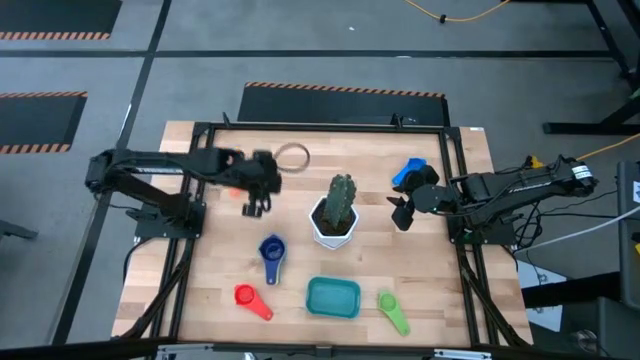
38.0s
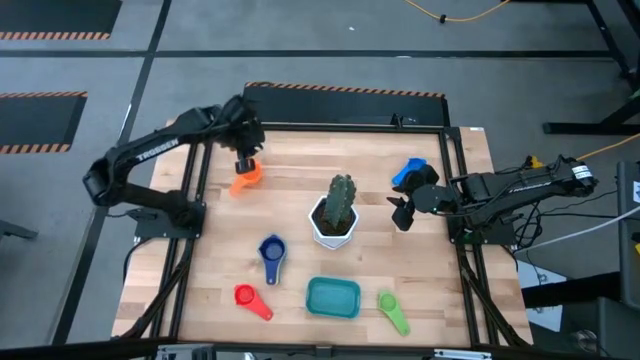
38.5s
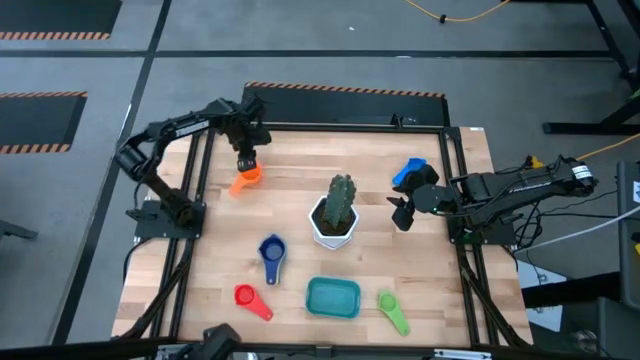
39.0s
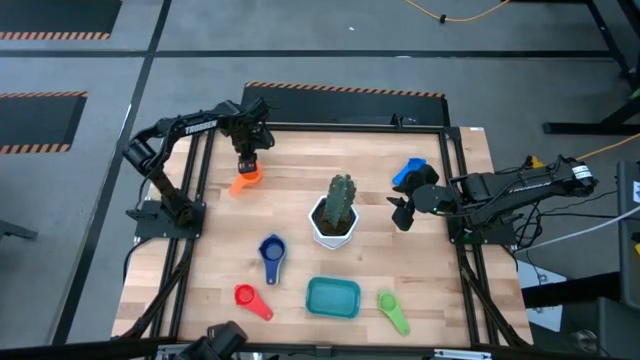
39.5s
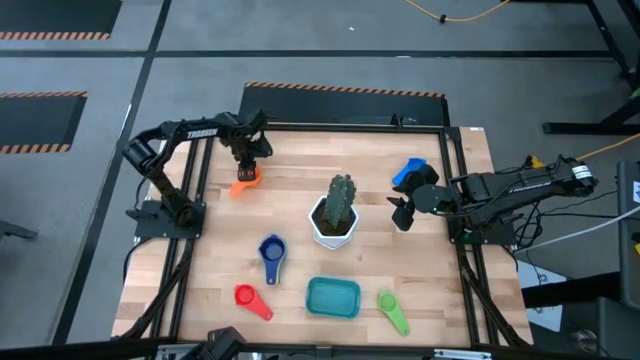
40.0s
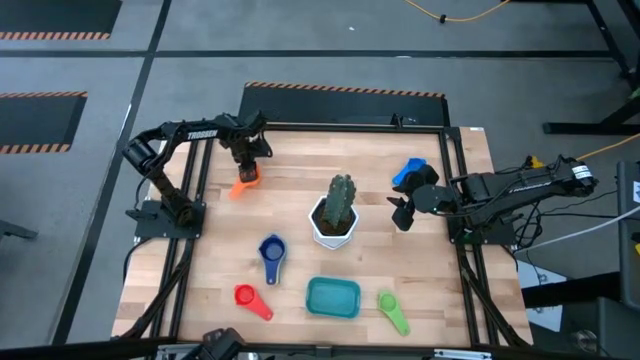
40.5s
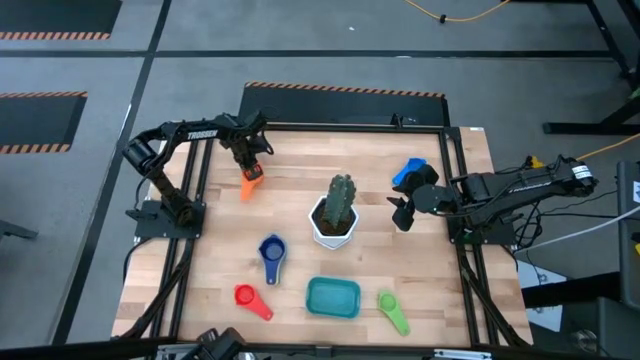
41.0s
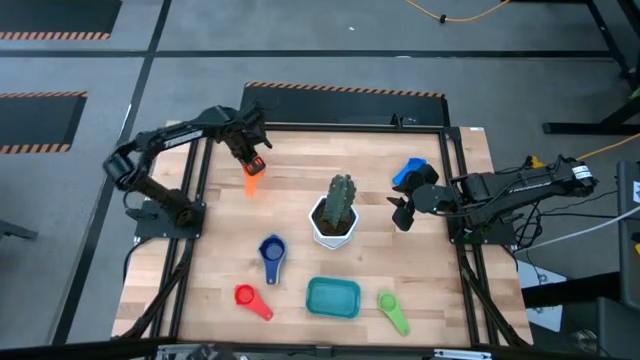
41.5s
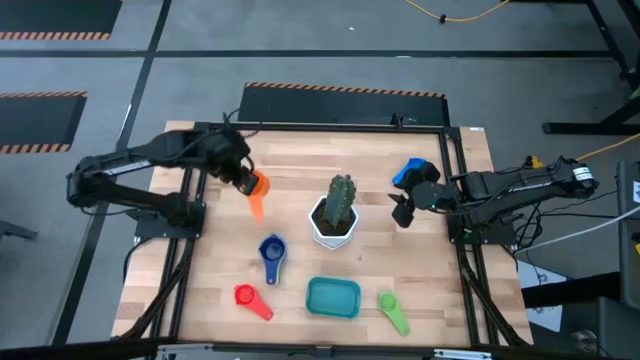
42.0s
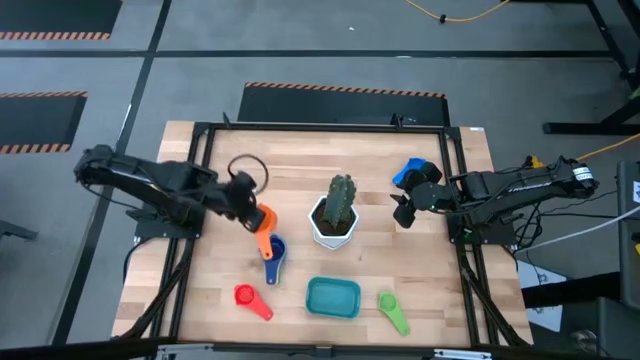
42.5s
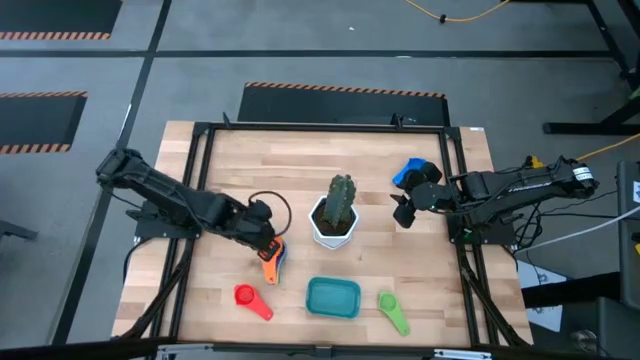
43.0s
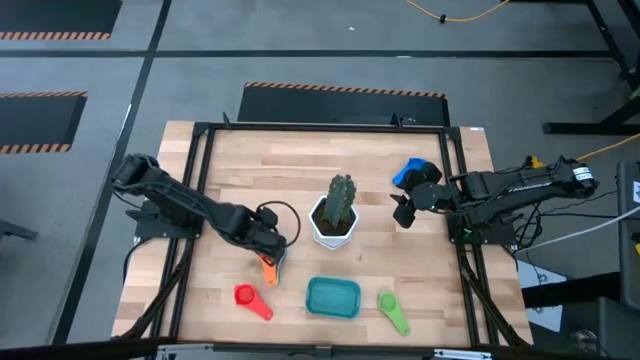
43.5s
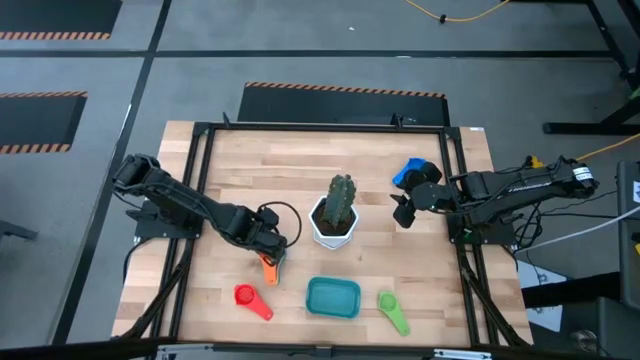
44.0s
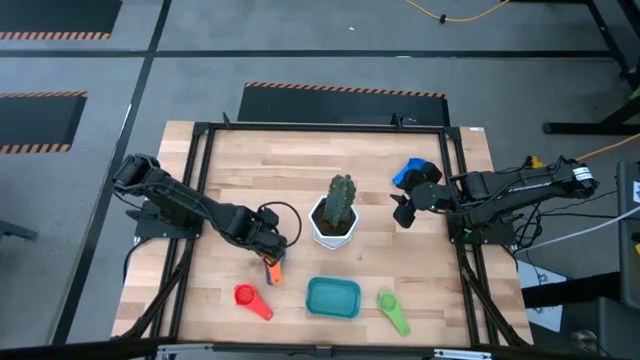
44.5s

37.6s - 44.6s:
Task: Nest measuring cups in basket
Stack the orange measuring cup on top of the dark blue measuring cup

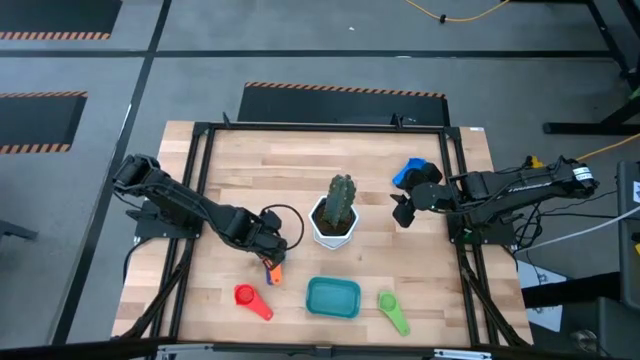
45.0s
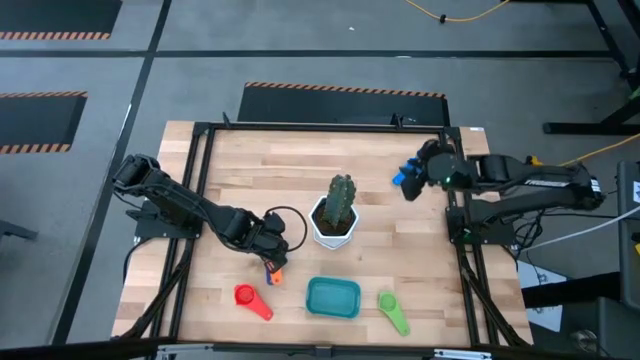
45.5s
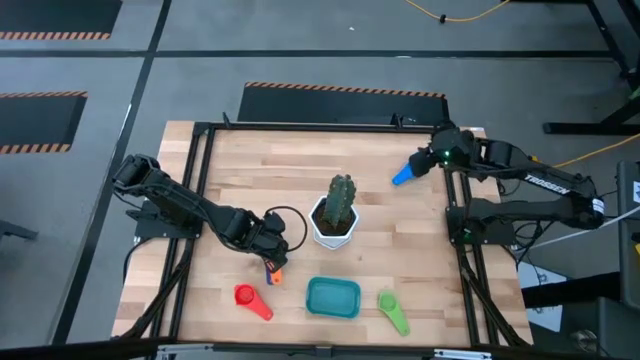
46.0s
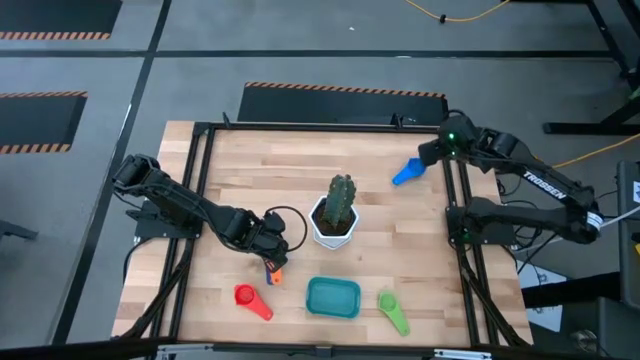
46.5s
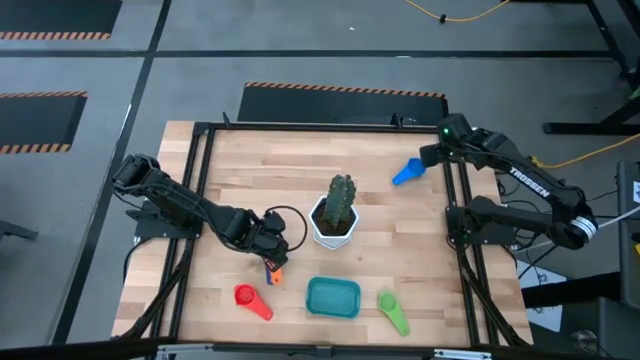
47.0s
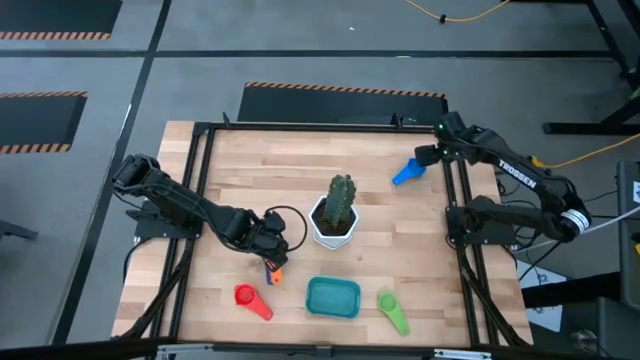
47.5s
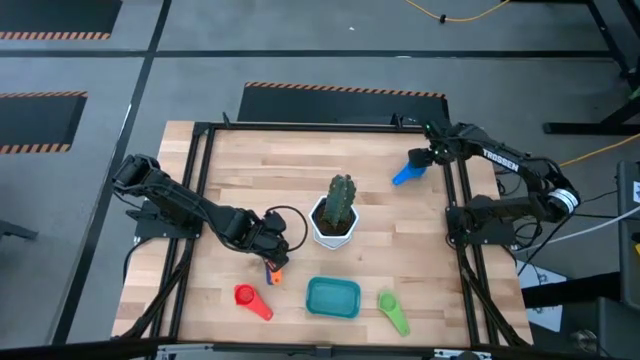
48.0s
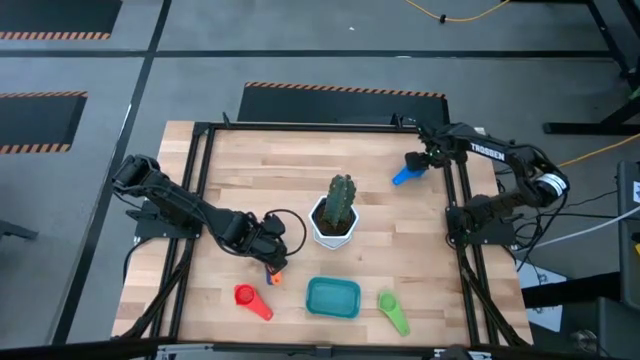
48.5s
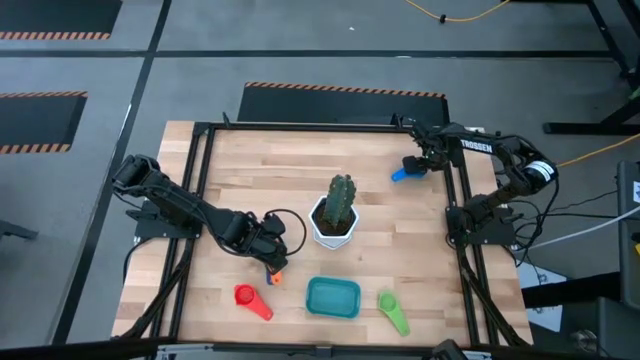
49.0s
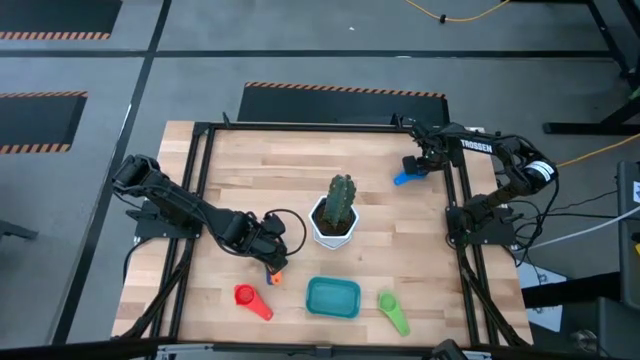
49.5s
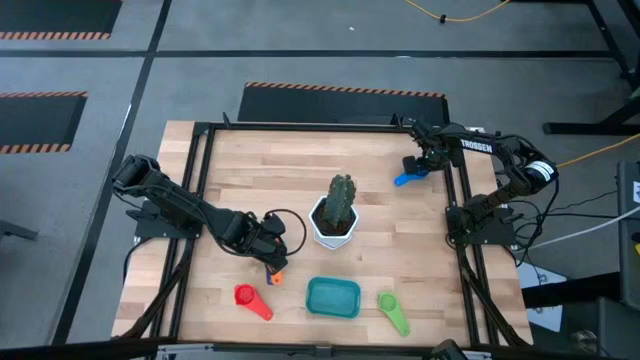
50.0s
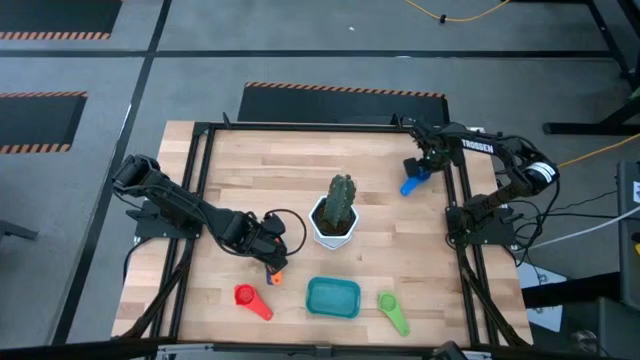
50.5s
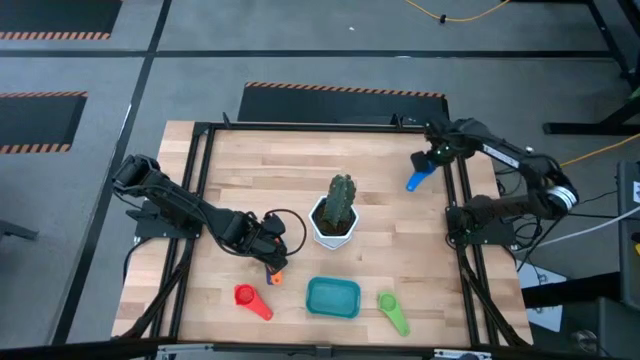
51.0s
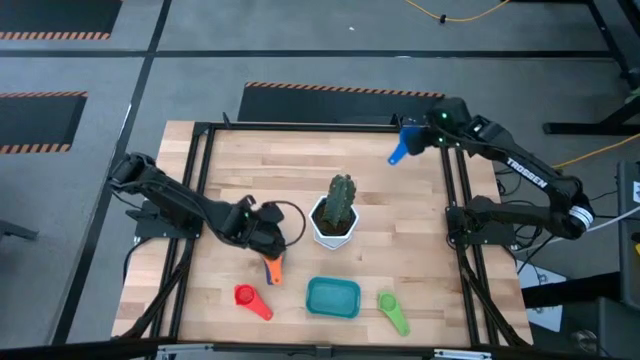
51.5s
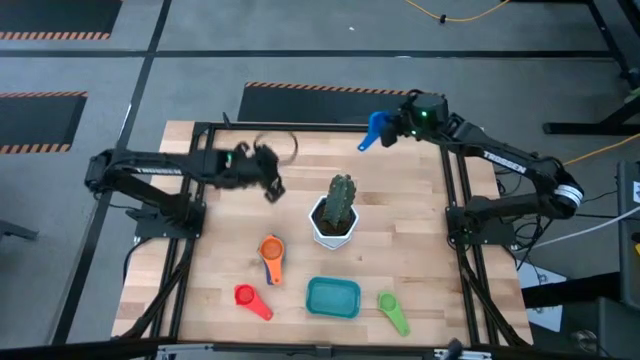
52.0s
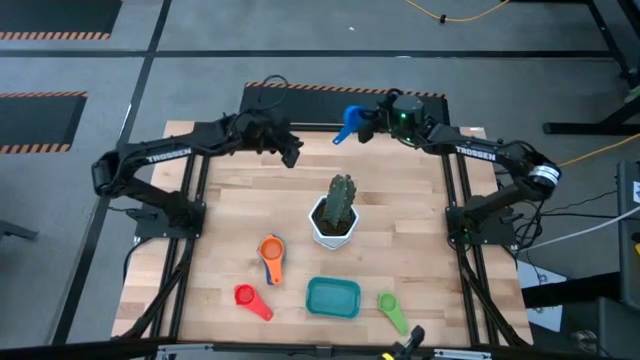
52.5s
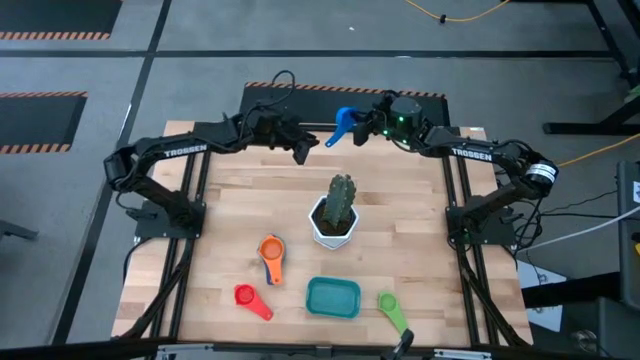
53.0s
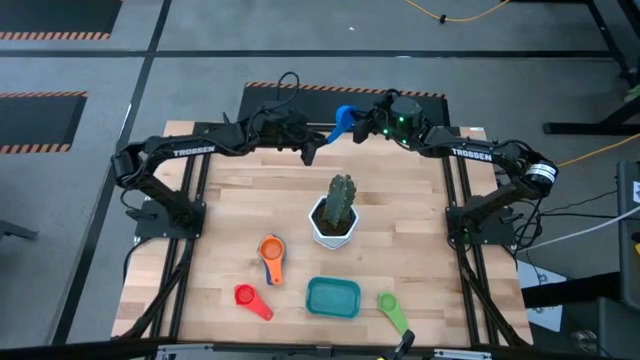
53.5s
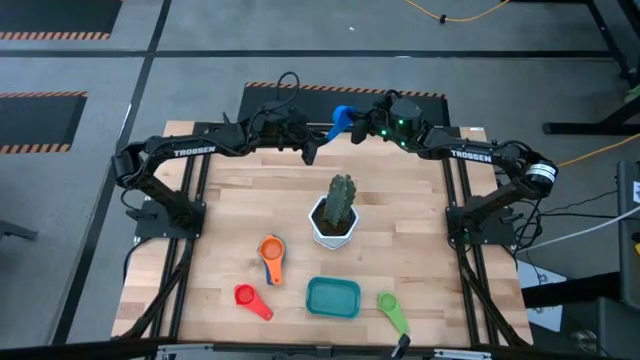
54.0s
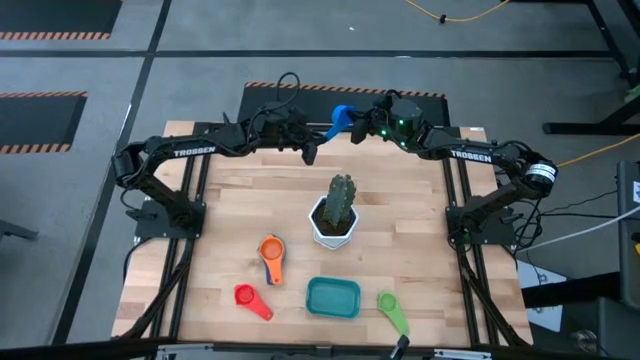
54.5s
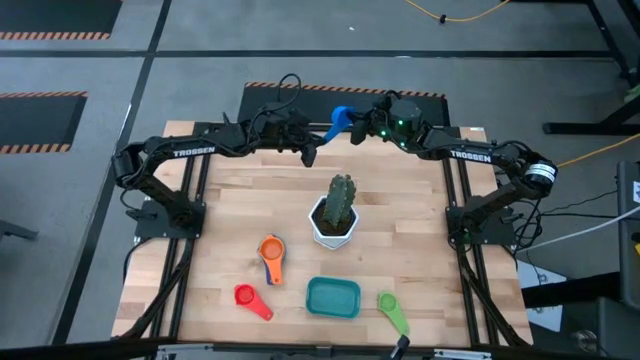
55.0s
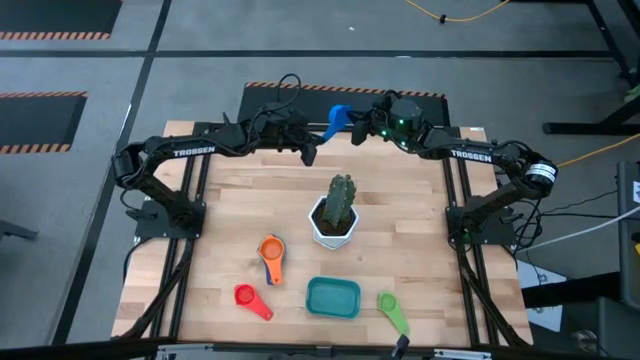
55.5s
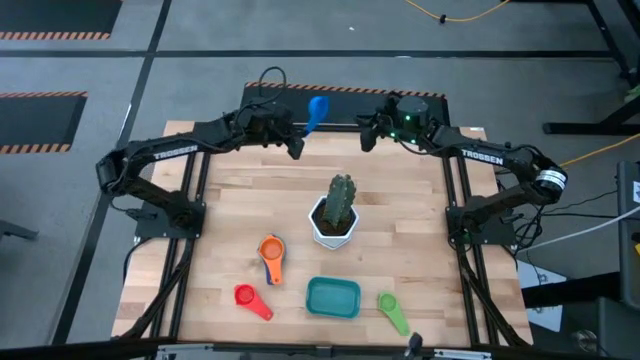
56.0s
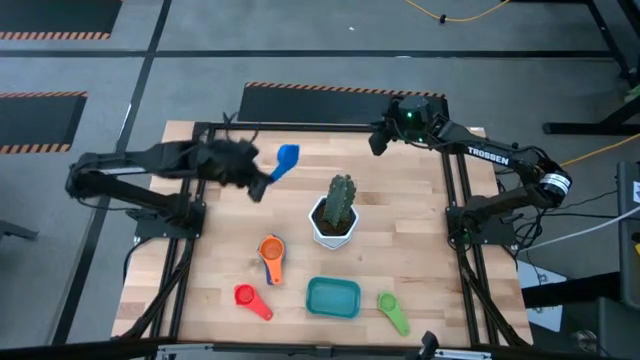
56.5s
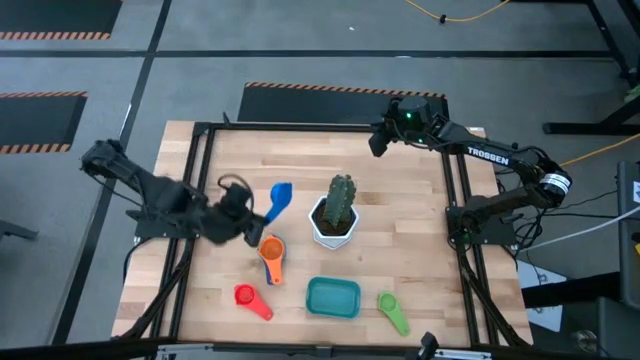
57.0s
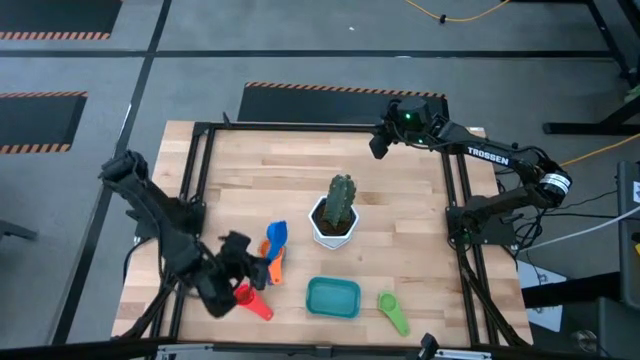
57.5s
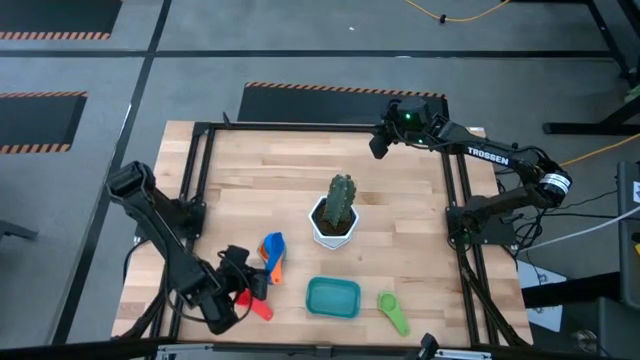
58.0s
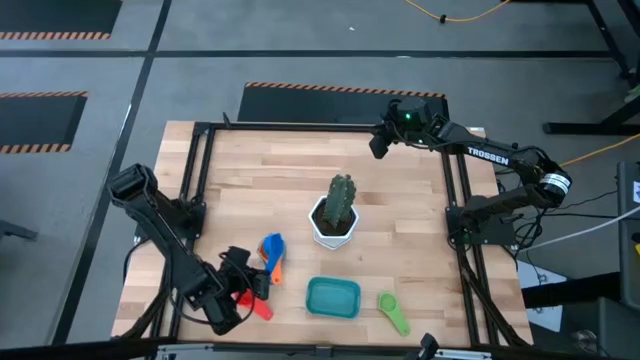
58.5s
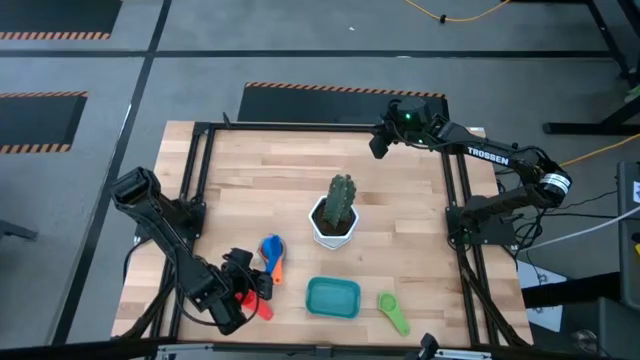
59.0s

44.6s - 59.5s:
Stack the blue measuring cup on top of the orange measuring cup
